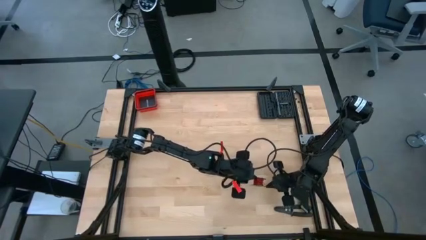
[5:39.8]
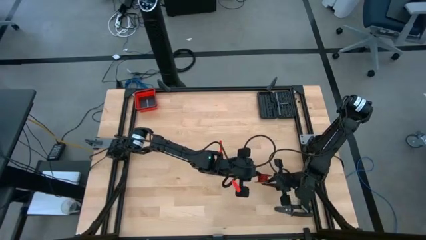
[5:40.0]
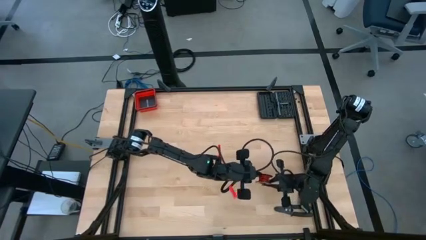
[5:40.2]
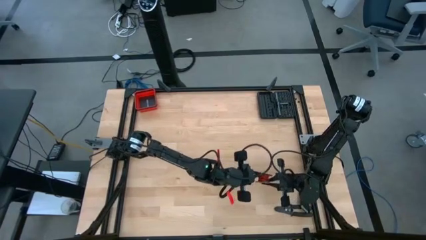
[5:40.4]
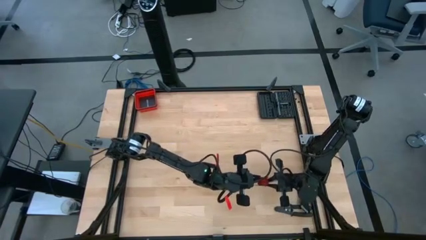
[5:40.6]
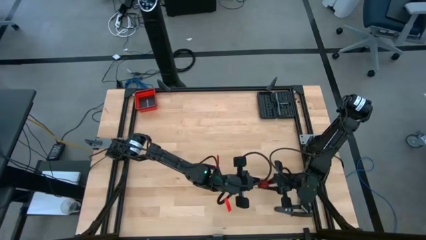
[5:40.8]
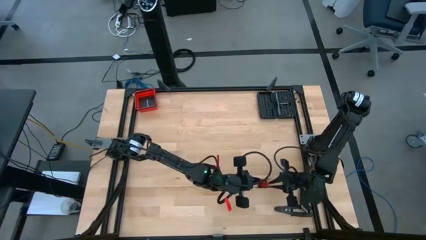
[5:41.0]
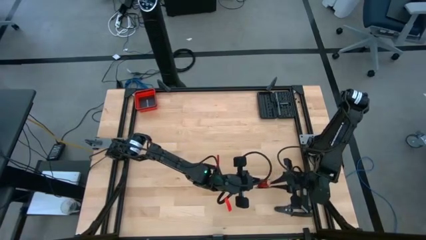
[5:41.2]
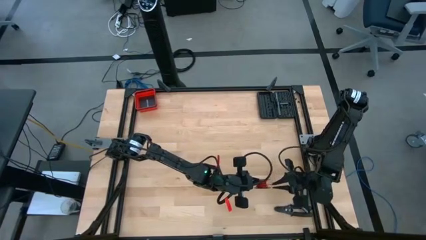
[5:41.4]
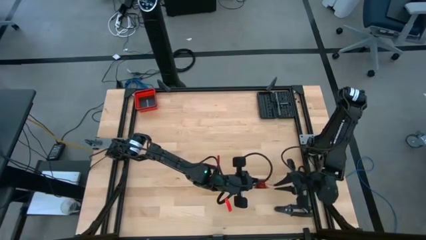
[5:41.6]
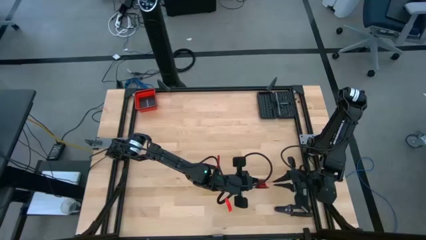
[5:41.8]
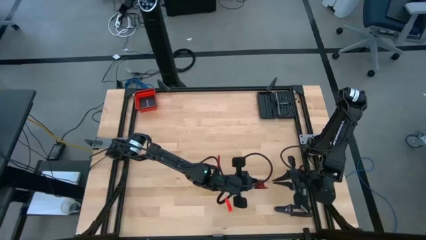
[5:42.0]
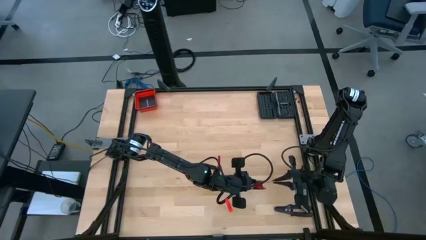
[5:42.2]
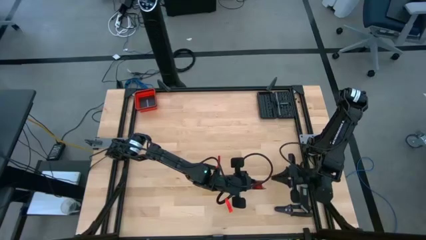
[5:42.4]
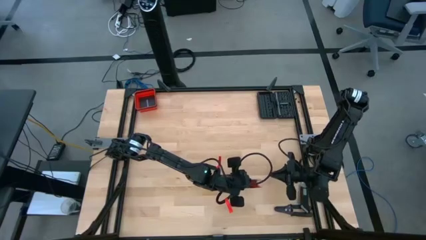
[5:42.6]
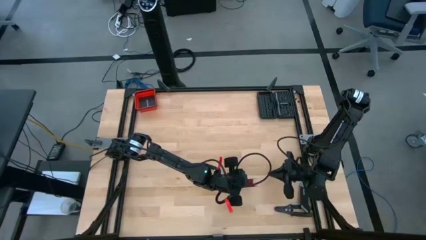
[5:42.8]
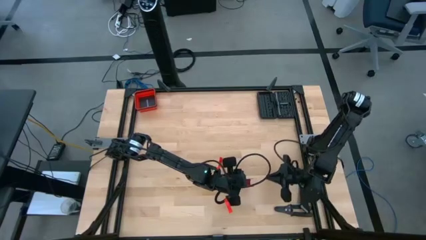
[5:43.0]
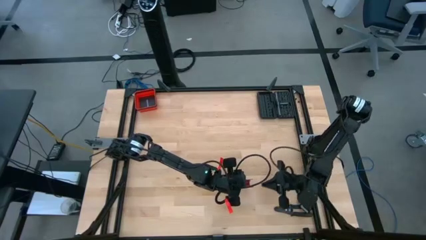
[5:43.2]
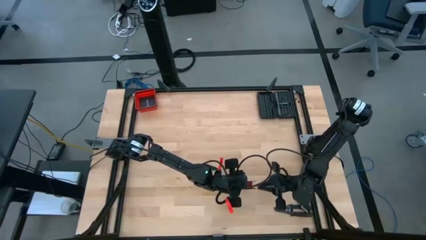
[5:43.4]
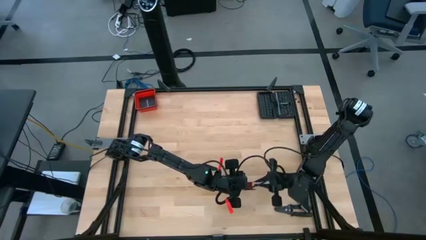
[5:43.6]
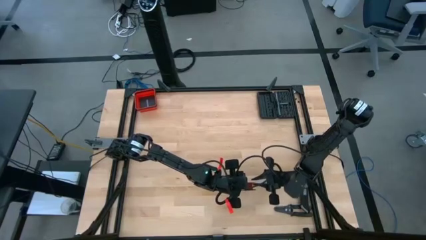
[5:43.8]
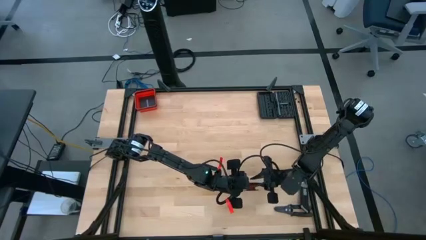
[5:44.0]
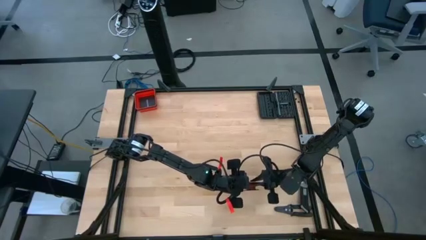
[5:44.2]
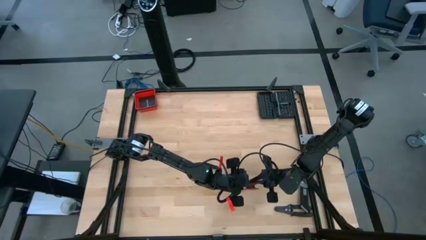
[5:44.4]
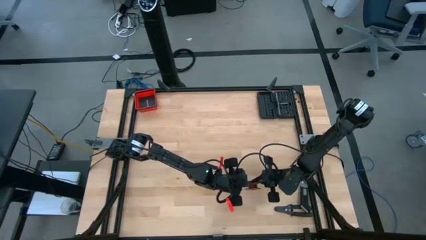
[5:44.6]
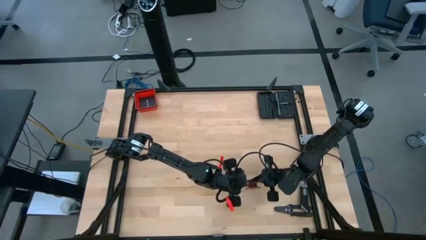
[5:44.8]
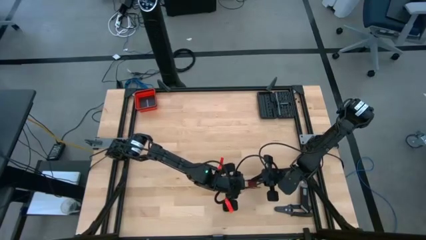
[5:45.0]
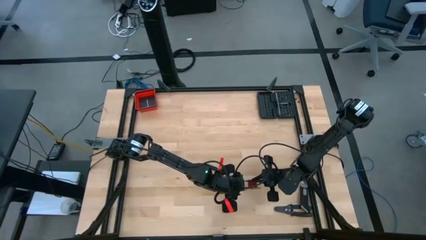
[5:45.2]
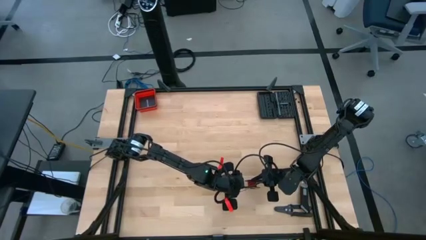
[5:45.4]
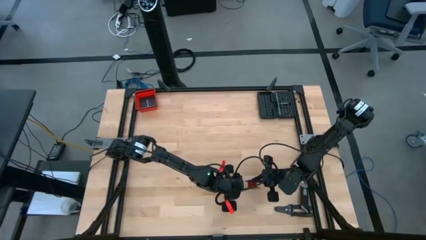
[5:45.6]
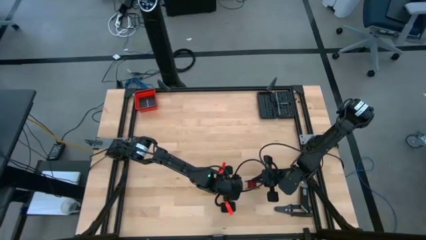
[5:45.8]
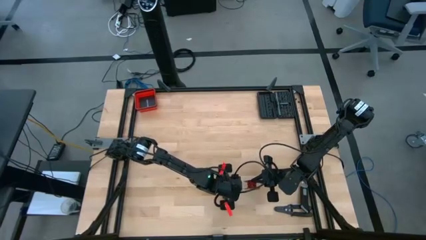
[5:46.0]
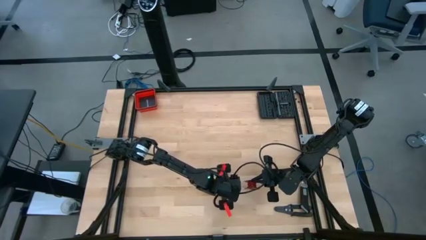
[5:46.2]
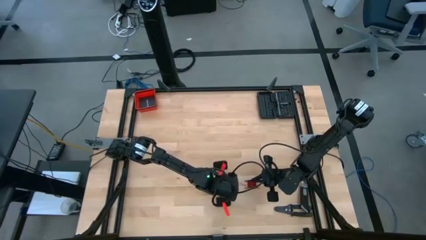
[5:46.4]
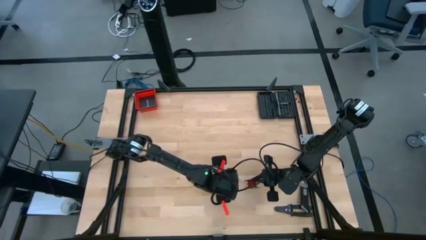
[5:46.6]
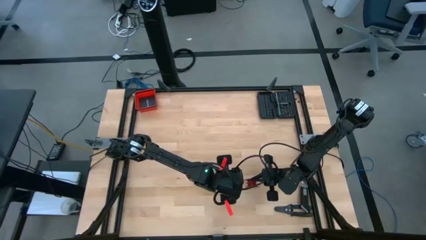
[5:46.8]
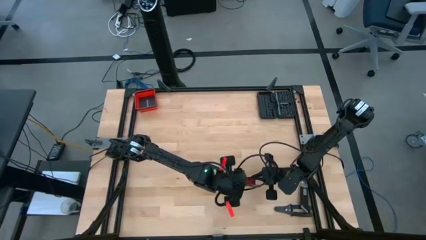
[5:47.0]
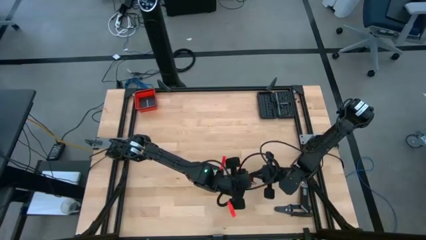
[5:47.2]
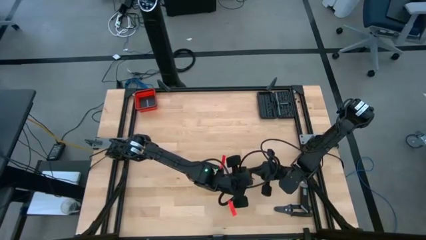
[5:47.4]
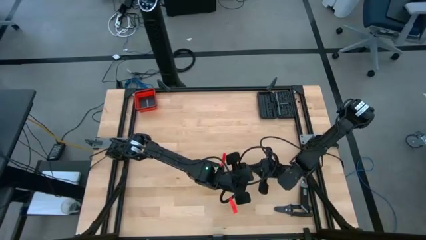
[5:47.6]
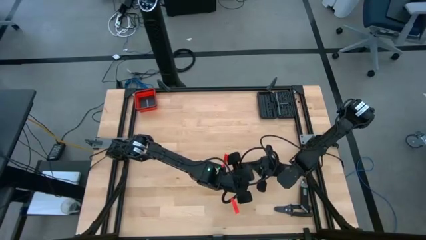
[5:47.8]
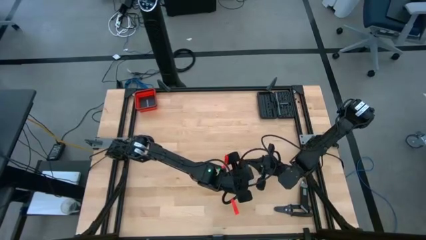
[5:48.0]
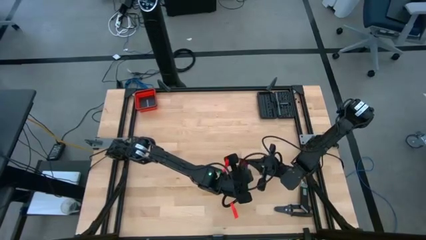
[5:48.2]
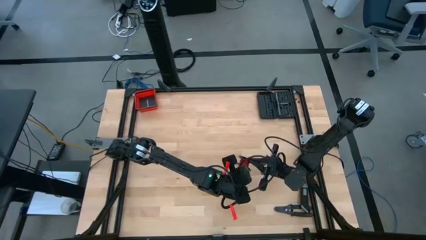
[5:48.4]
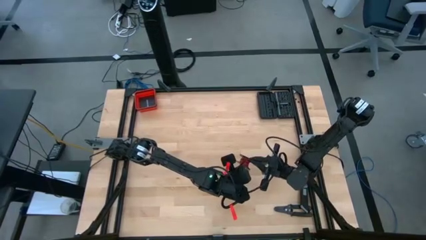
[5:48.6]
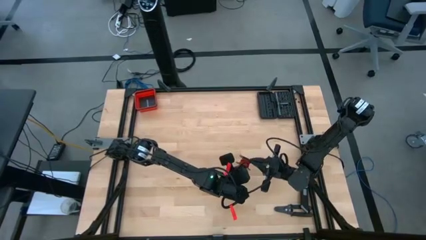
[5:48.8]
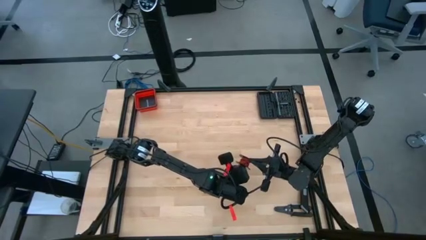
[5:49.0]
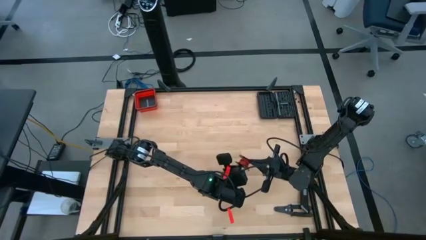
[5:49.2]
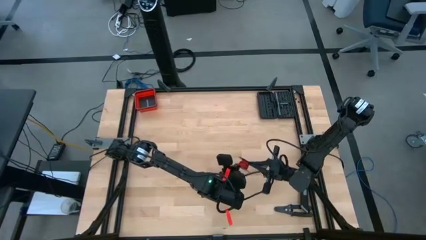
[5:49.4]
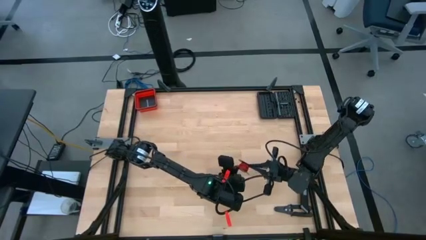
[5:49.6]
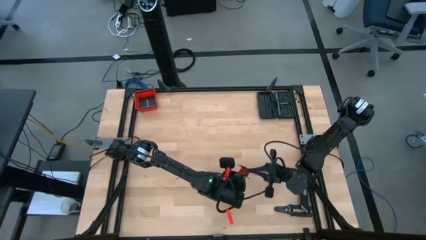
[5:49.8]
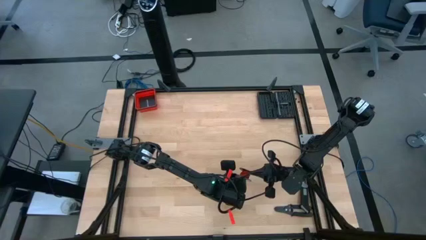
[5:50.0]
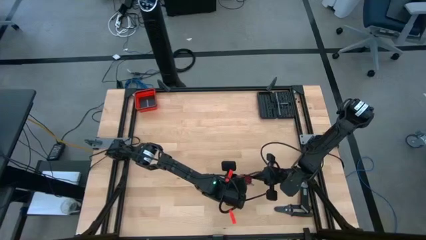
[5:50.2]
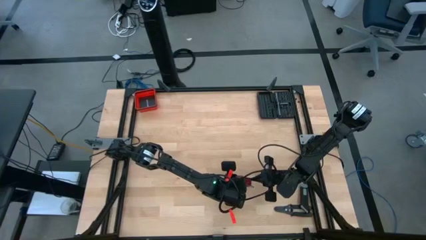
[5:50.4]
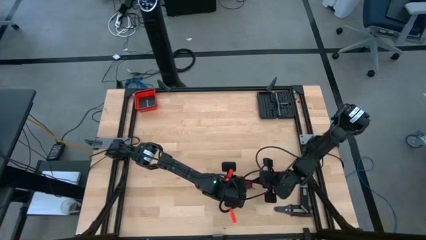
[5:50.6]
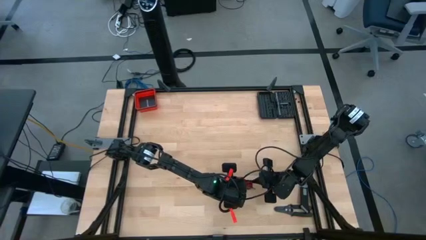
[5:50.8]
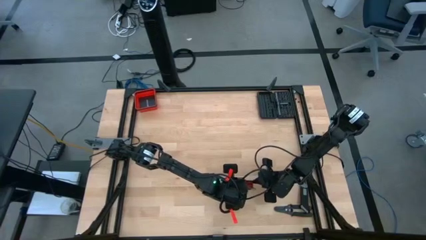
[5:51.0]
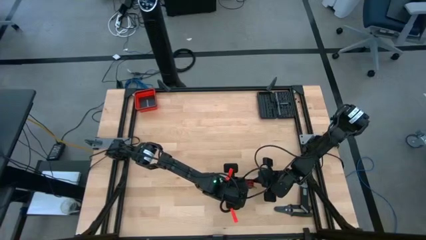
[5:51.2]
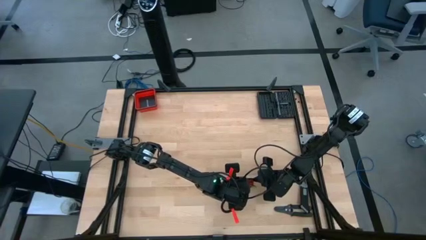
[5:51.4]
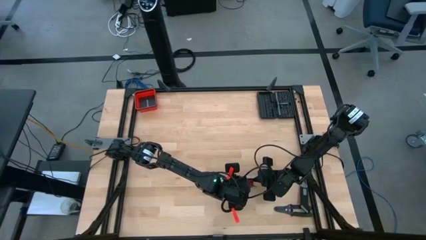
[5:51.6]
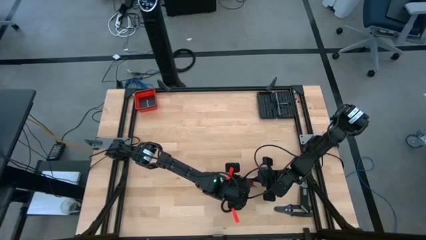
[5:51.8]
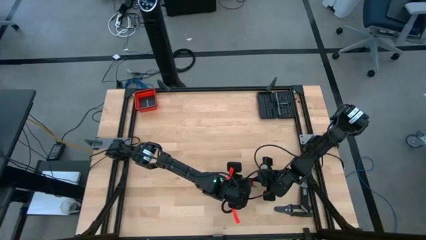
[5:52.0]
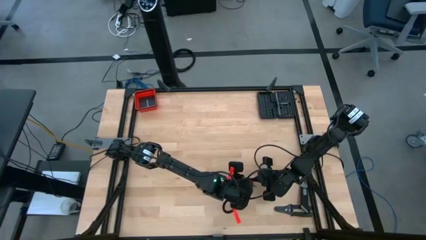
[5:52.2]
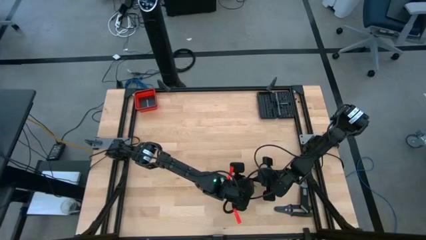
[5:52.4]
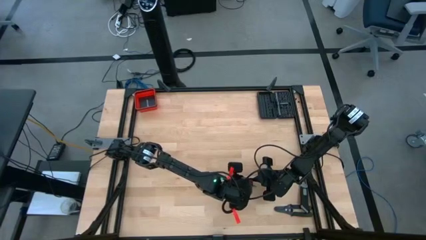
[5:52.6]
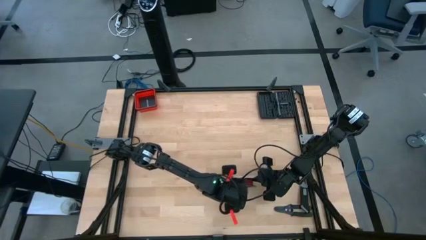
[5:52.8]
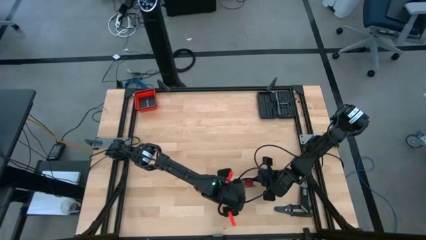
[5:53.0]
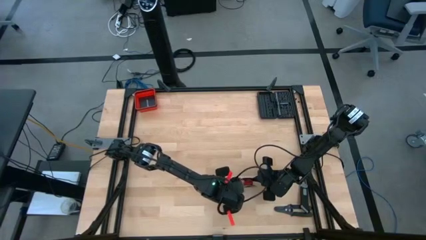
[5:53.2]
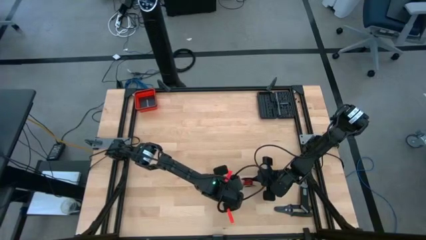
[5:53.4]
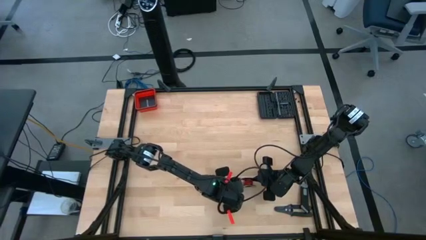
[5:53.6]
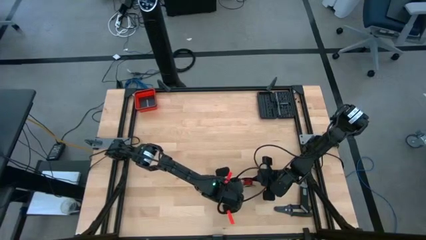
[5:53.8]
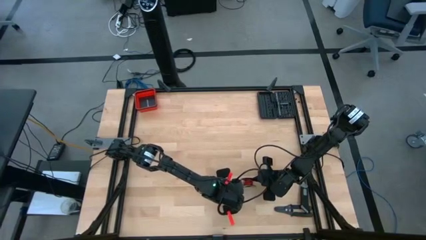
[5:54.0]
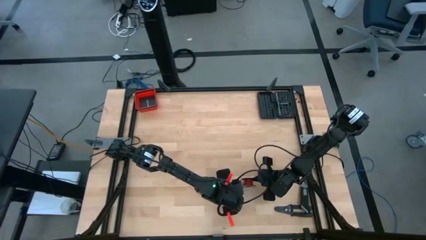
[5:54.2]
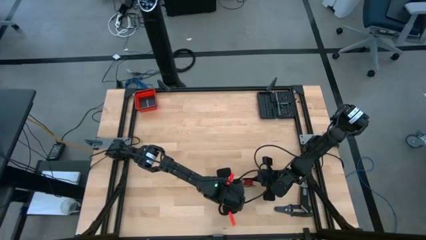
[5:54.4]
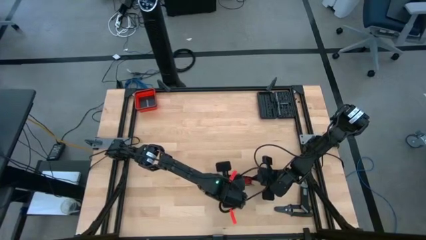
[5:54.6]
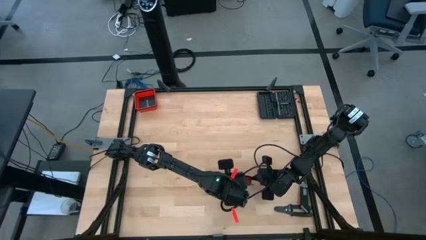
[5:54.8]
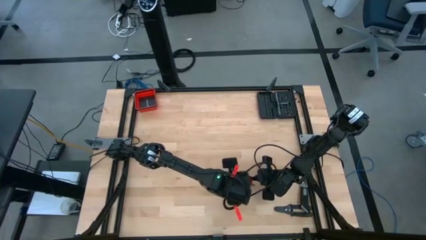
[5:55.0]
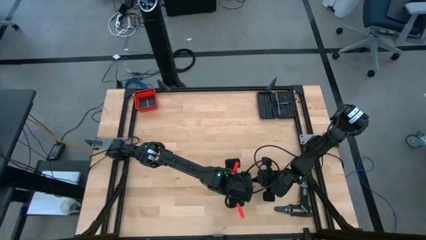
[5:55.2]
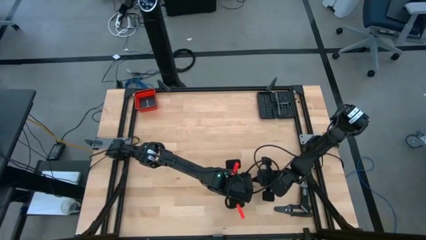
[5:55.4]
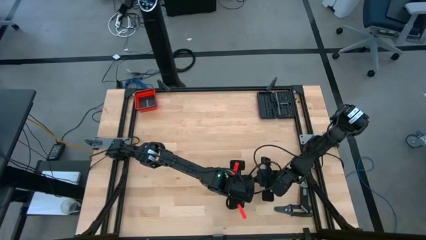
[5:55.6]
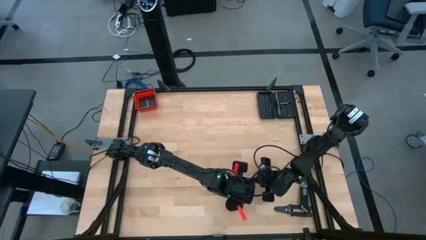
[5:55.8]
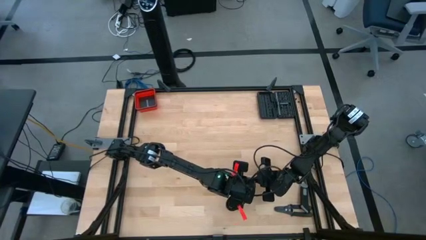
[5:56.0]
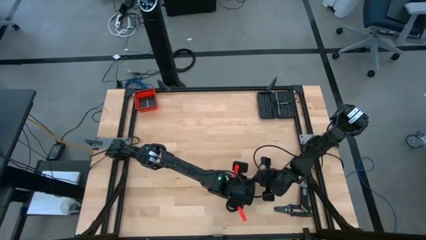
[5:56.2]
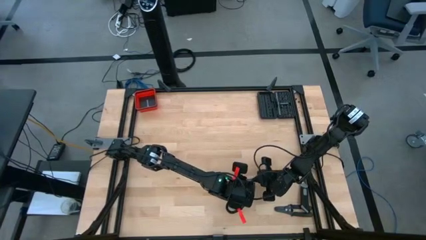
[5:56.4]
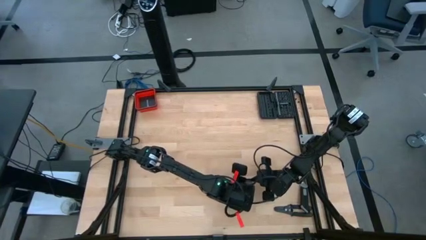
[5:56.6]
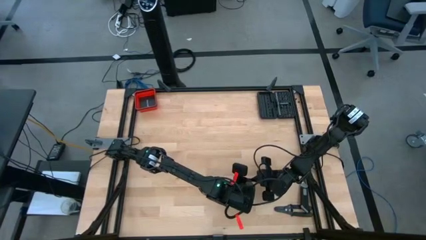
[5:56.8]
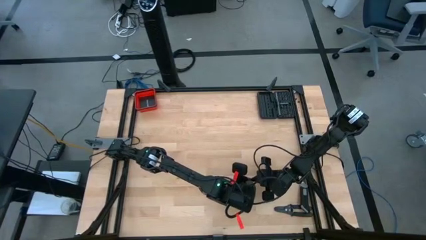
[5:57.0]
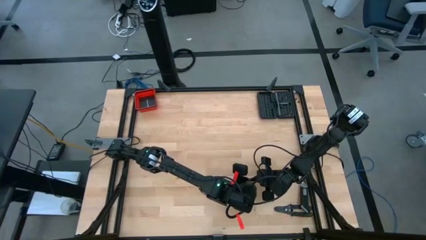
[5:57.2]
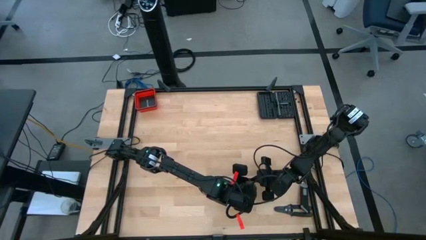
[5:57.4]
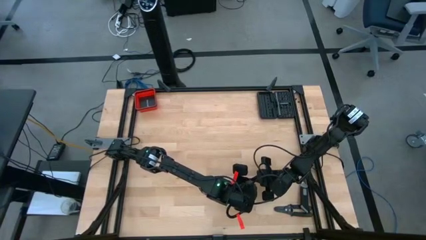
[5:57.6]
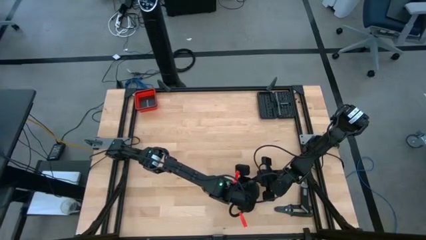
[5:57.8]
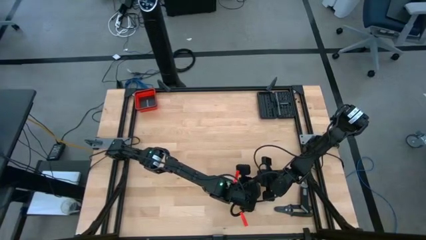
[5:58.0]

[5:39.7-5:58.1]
Task: Coil cords
Coil the red wire onto the spool
